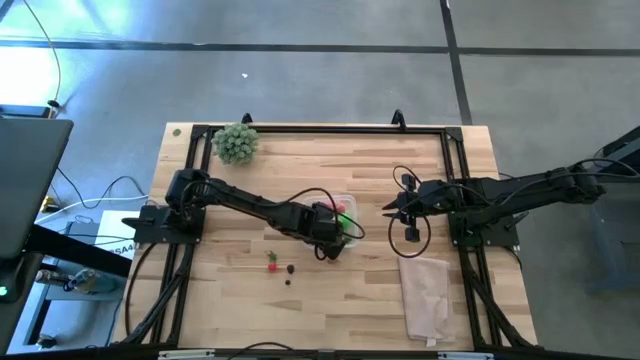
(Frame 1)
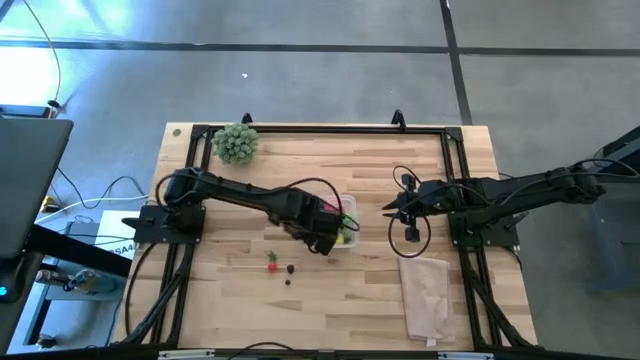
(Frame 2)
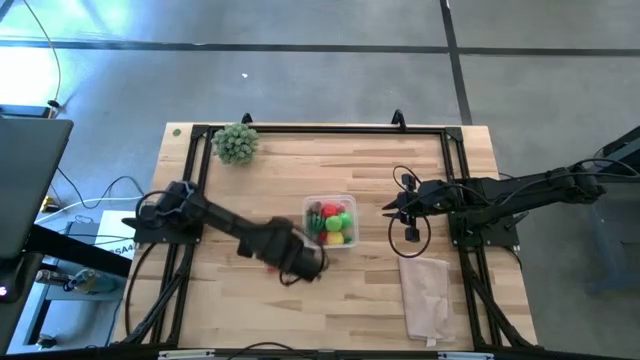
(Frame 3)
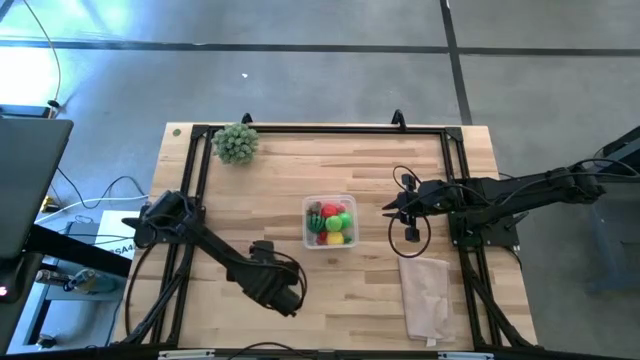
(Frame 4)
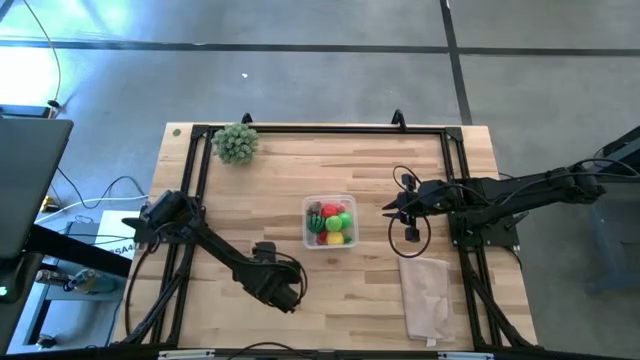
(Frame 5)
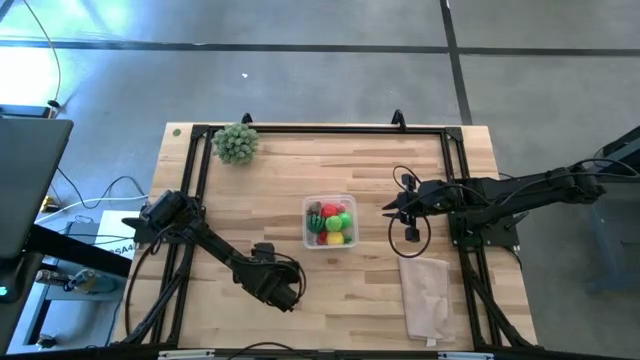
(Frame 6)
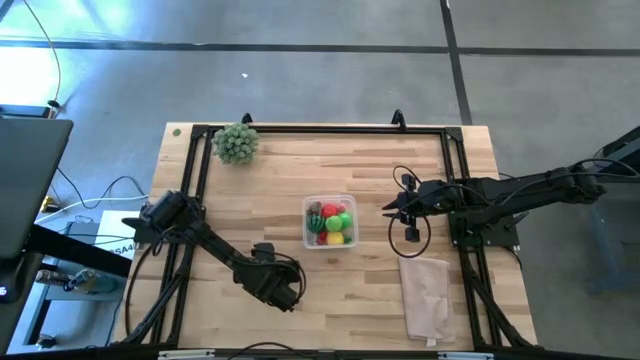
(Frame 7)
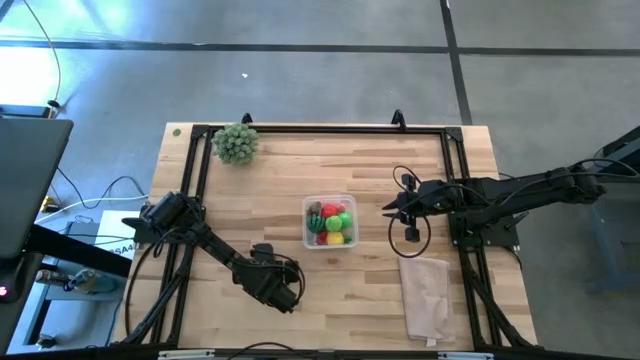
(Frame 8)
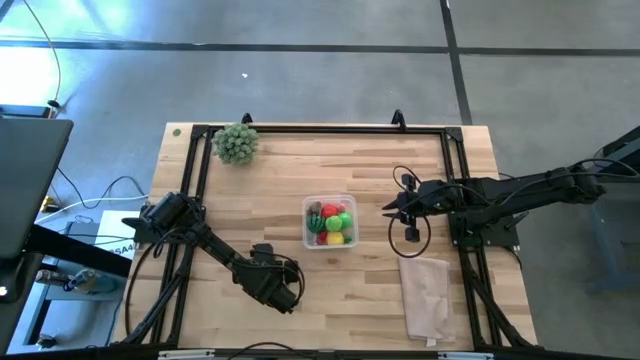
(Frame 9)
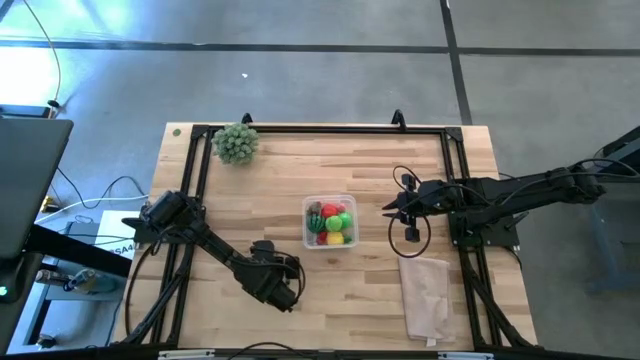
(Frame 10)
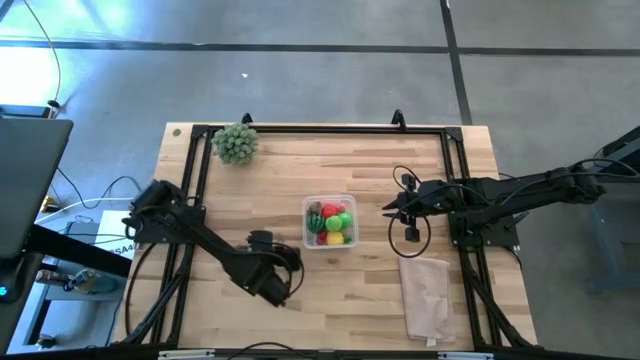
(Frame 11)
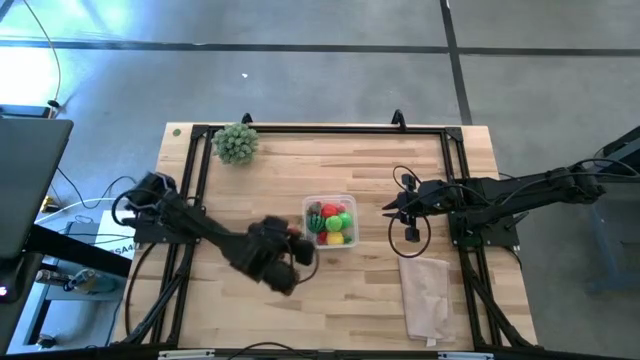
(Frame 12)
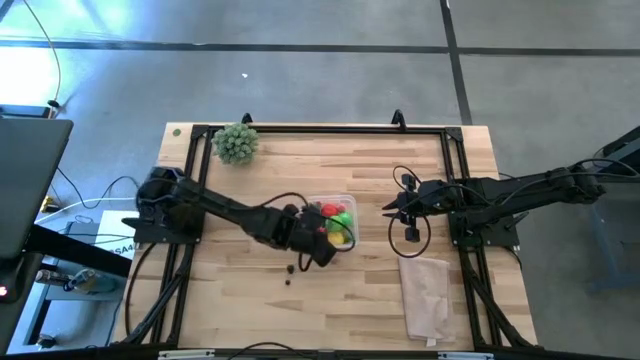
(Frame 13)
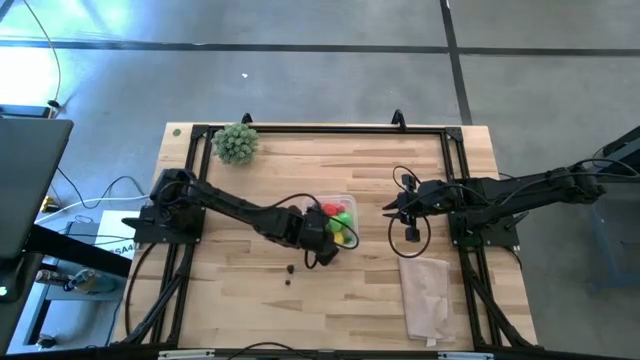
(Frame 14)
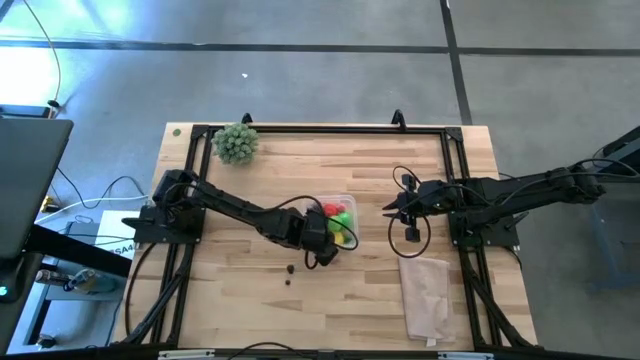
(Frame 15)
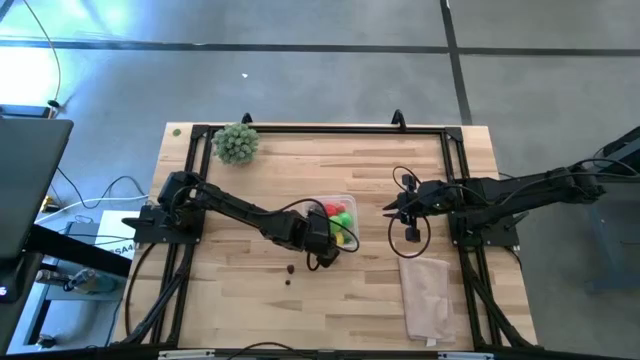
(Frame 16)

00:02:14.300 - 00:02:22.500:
Task: Pick and placing Produce into tupperware
Put the red cherry into the transparent bin

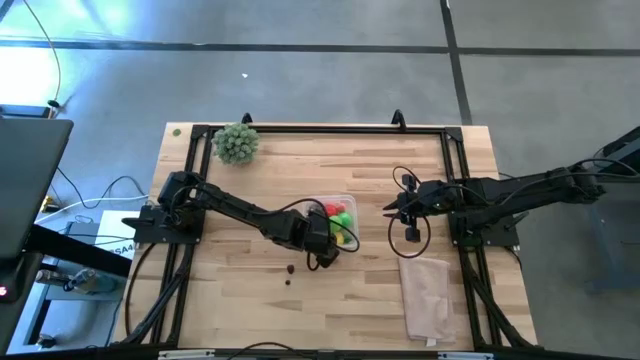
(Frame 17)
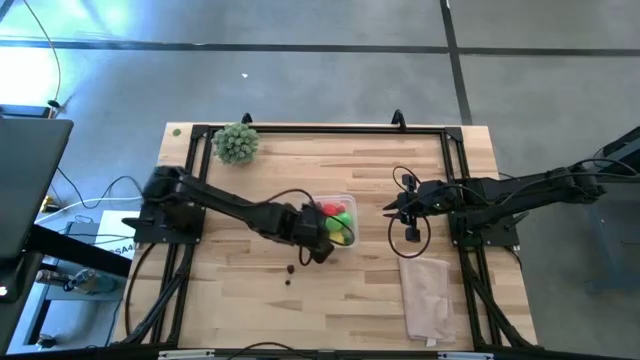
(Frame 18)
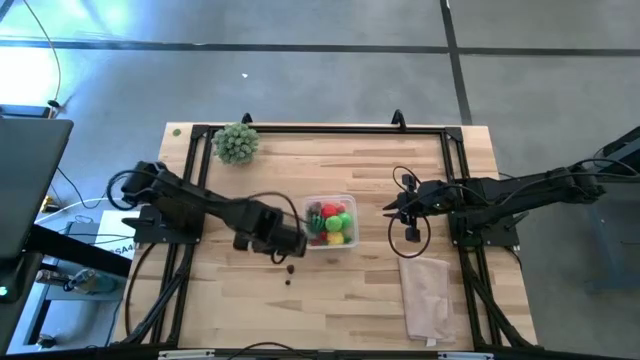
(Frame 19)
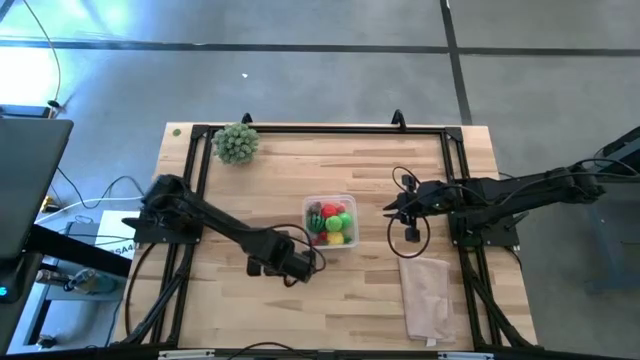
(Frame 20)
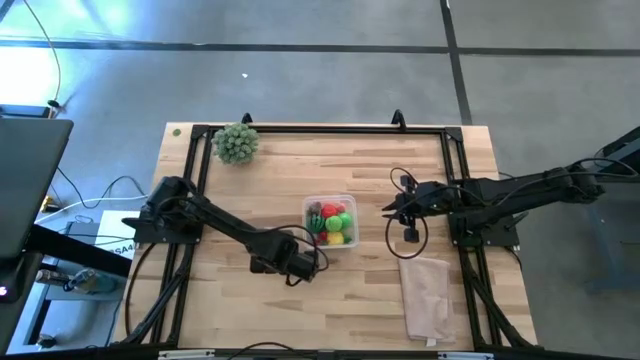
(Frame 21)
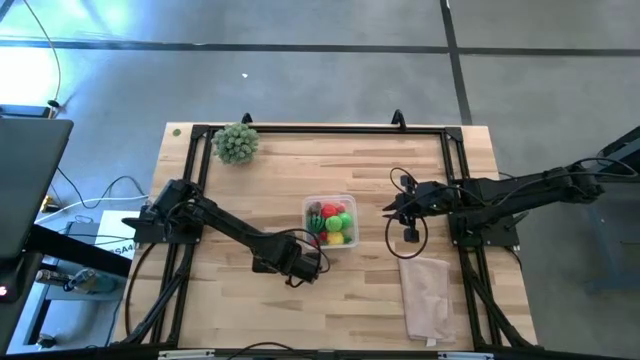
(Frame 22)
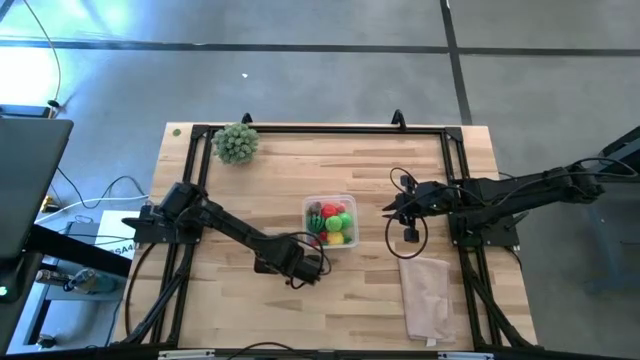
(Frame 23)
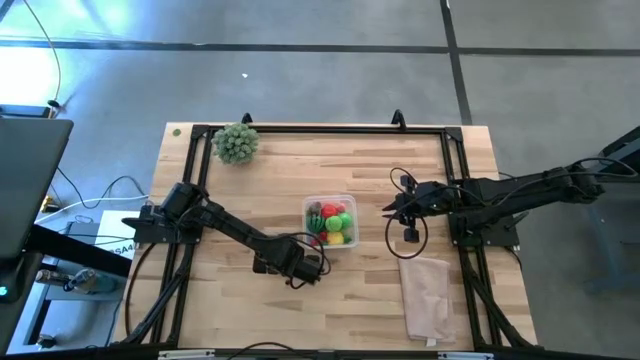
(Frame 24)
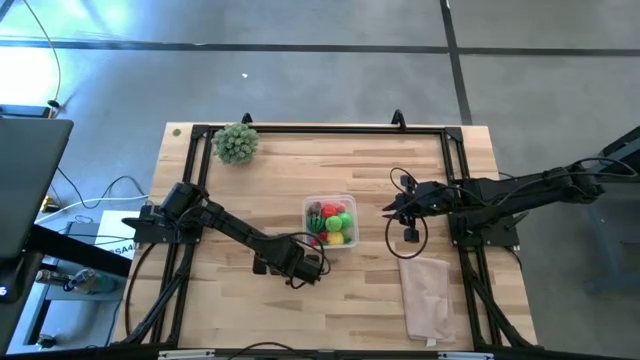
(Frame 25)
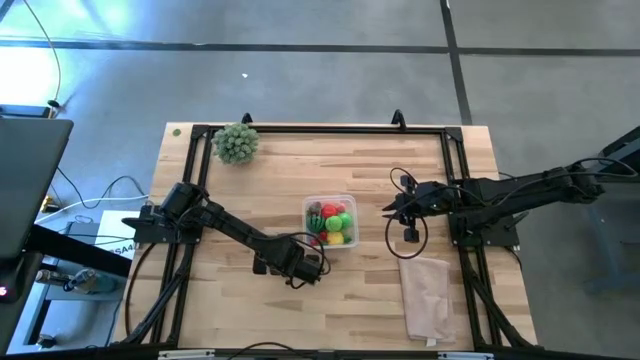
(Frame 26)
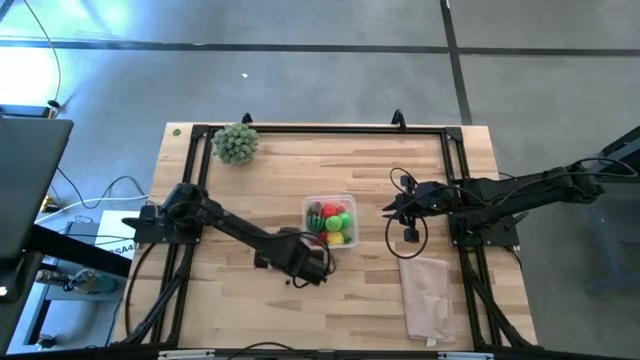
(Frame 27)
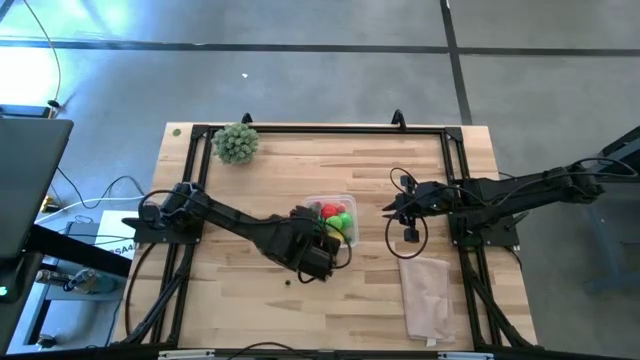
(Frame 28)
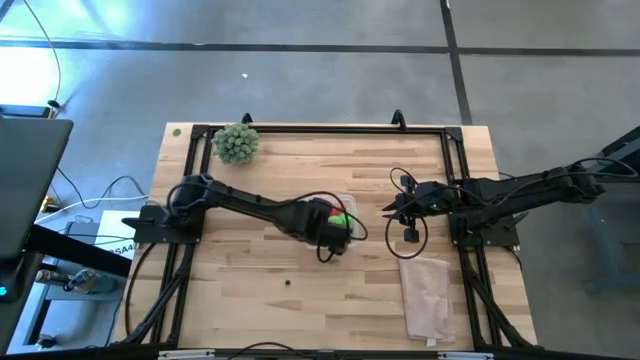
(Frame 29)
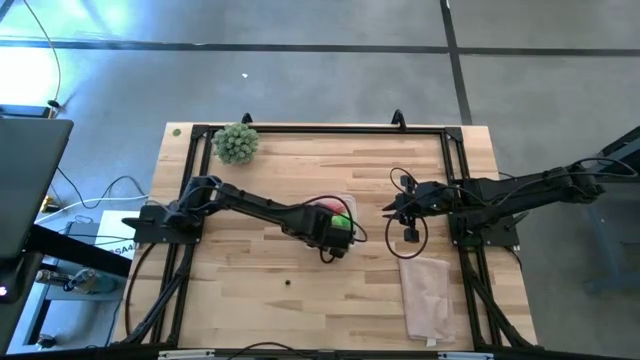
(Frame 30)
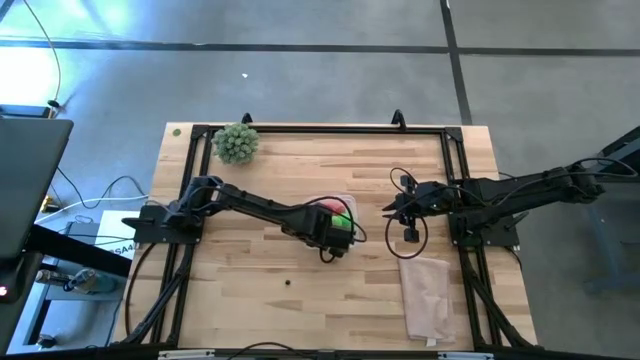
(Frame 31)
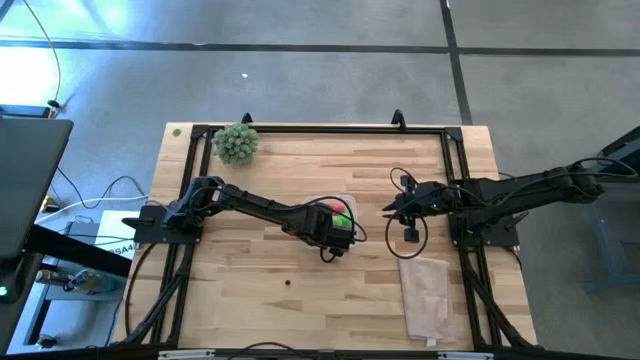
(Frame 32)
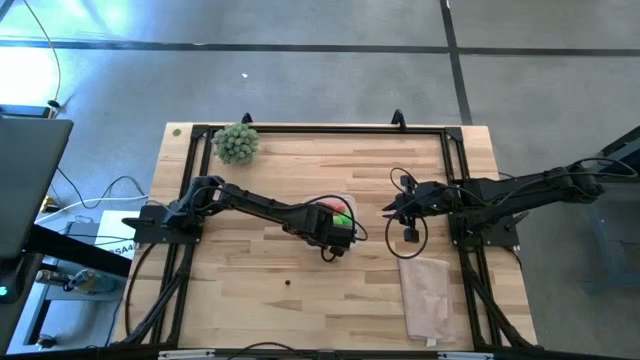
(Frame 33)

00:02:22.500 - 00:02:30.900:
Put the black blackberry into the transparent bin

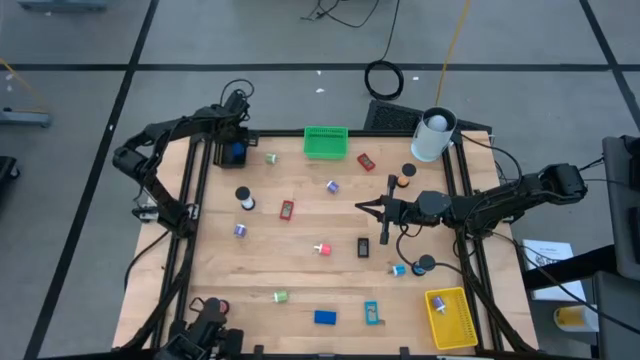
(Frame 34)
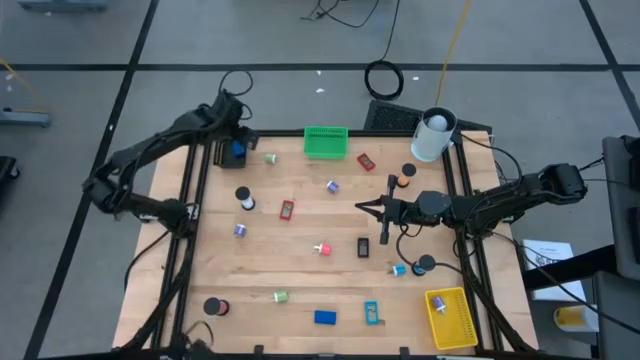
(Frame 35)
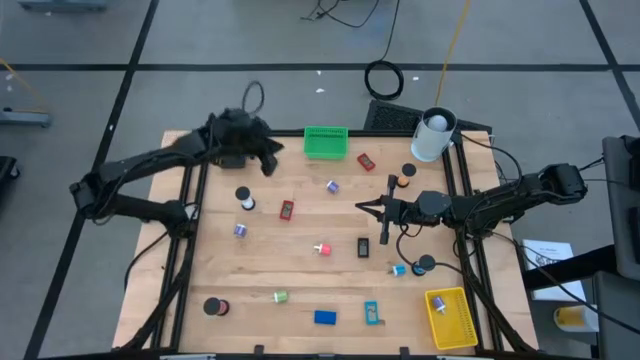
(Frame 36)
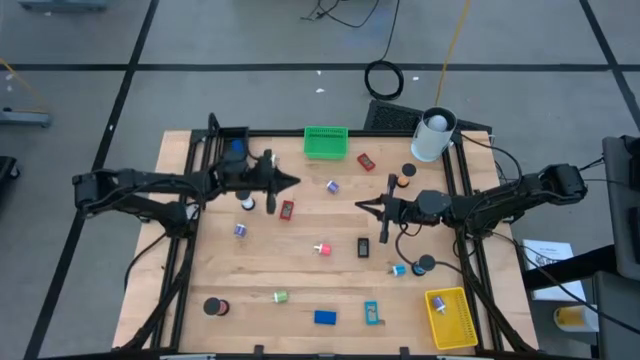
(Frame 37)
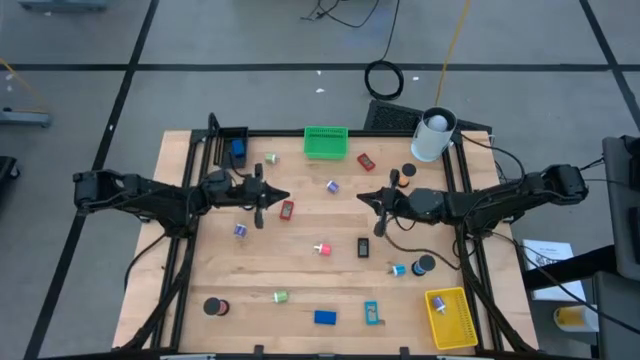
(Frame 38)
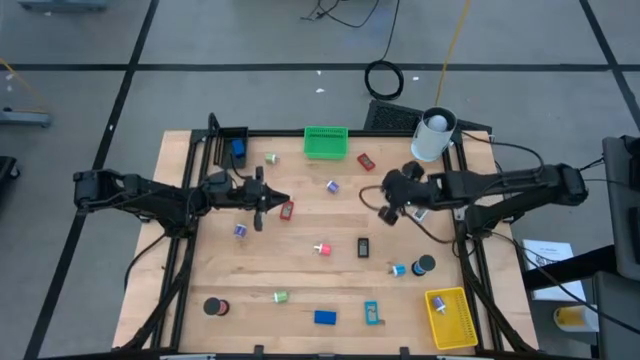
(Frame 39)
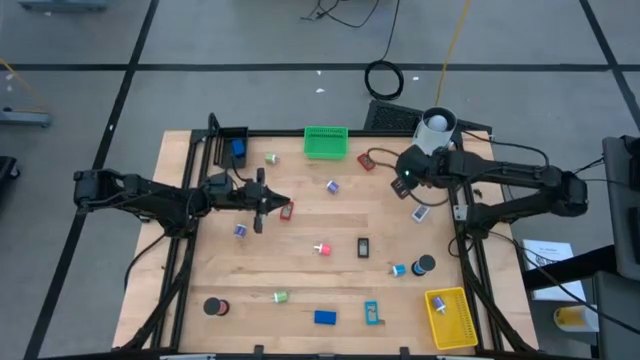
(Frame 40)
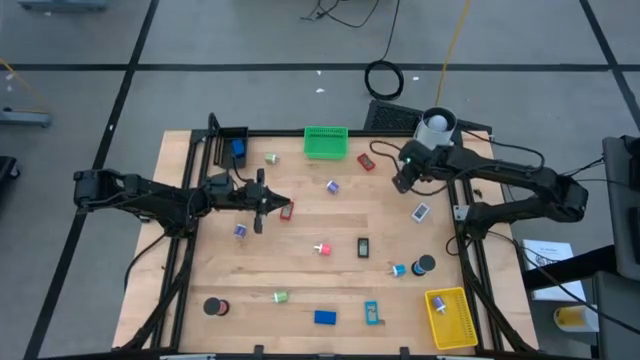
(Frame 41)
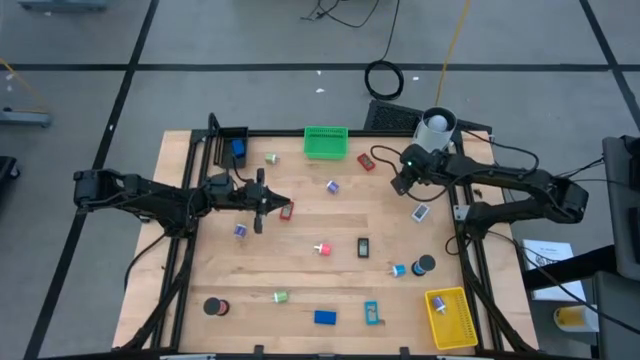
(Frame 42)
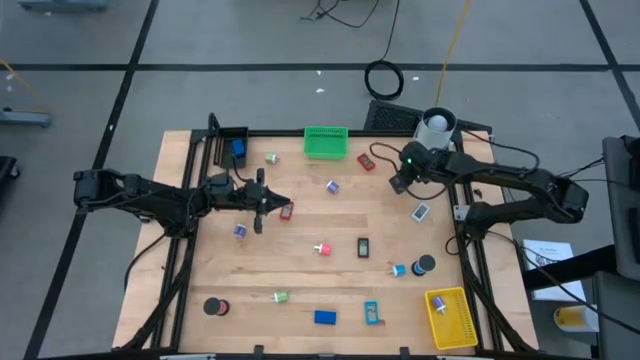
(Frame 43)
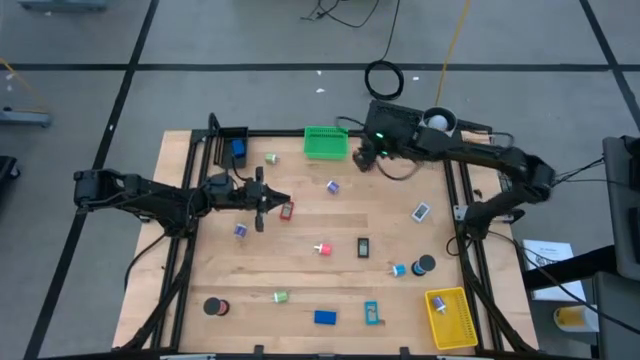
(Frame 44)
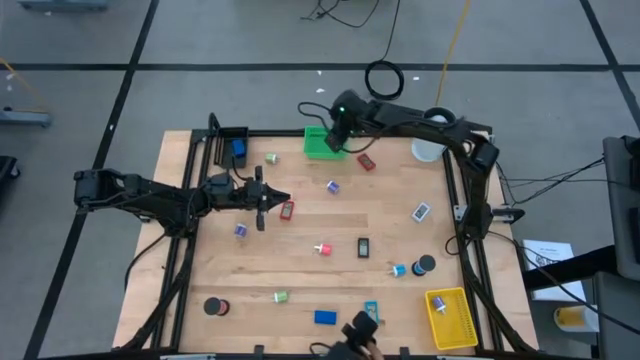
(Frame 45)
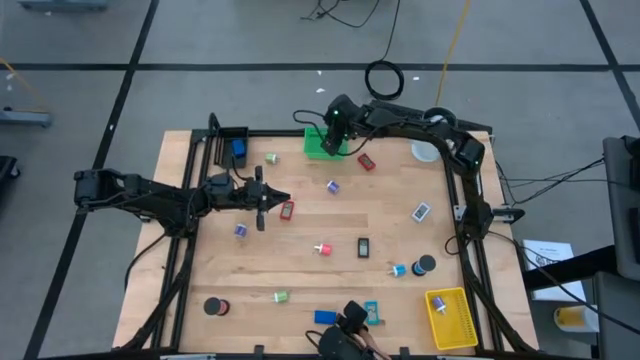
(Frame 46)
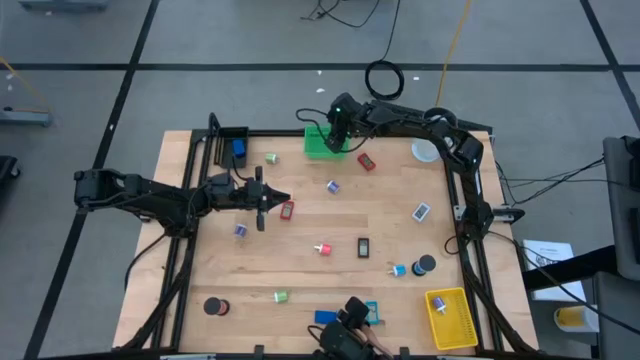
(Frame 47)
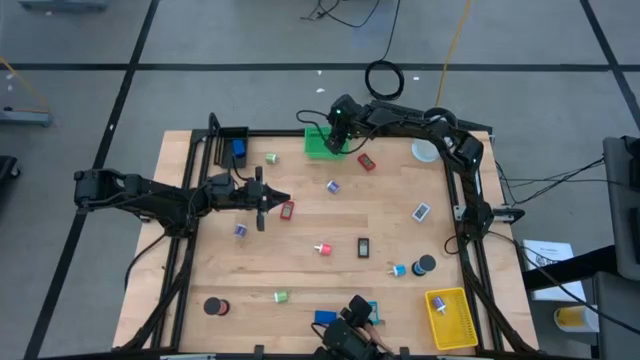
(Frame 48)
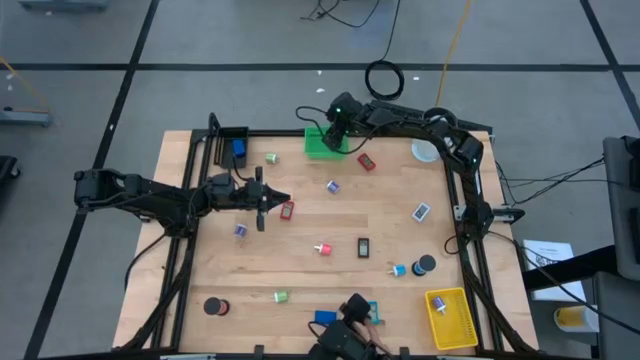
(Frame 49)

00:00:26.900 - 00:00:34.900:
Task: Pick & Place Office items
Put the orange hourglass into the green basket
